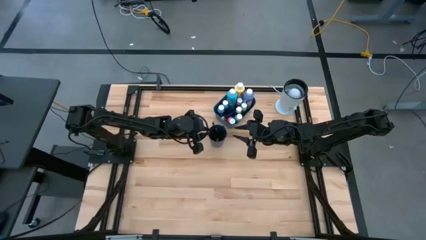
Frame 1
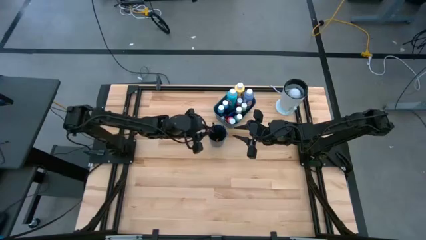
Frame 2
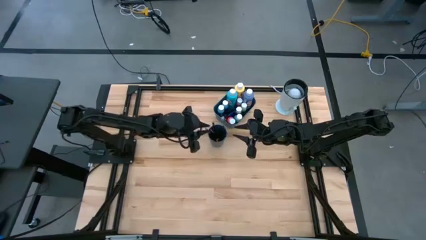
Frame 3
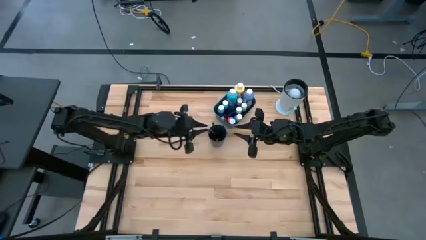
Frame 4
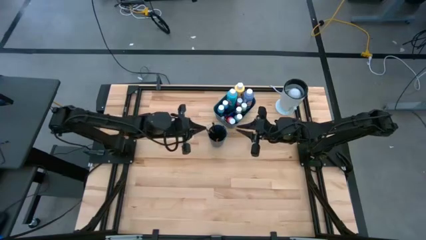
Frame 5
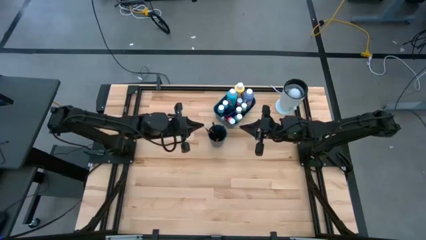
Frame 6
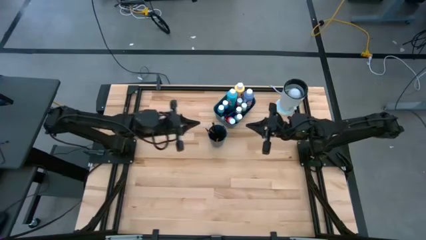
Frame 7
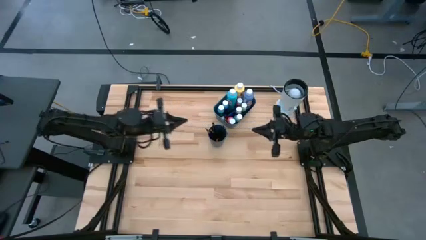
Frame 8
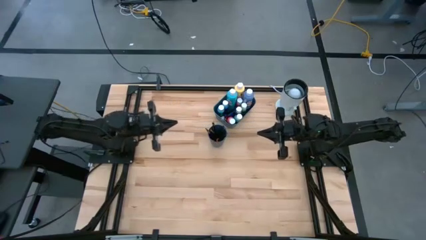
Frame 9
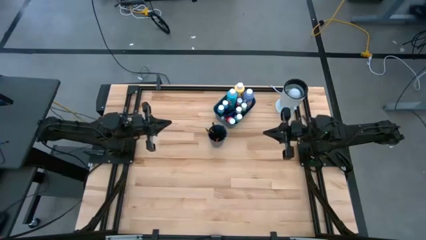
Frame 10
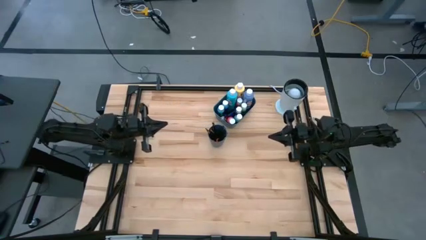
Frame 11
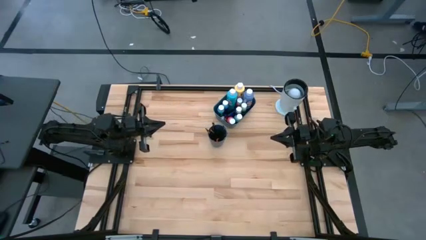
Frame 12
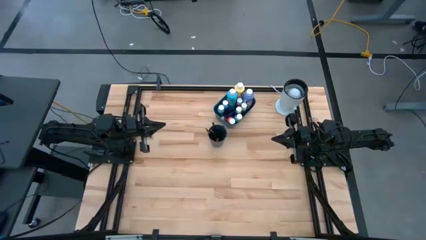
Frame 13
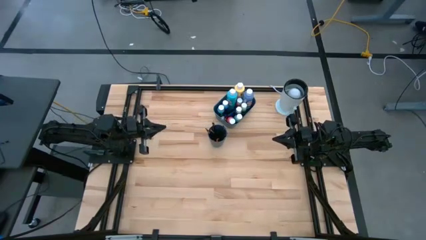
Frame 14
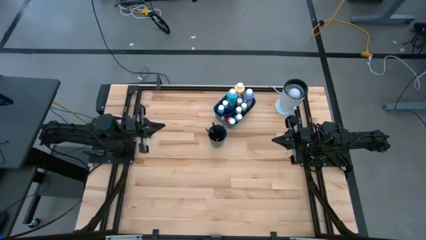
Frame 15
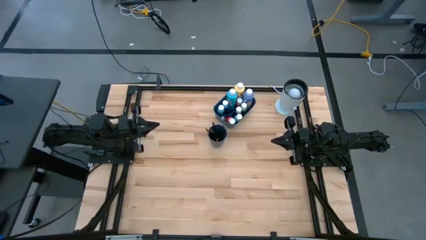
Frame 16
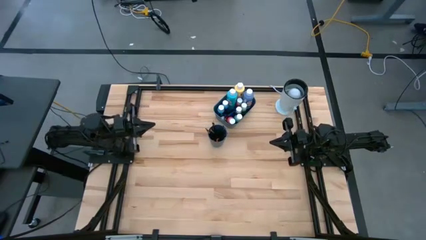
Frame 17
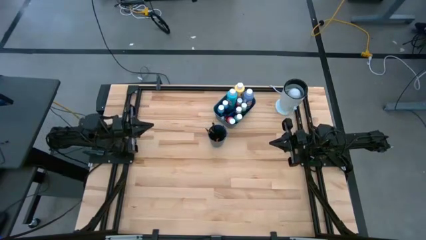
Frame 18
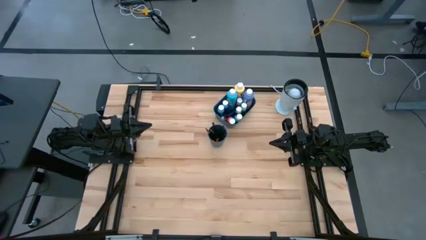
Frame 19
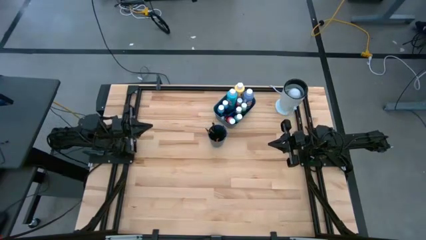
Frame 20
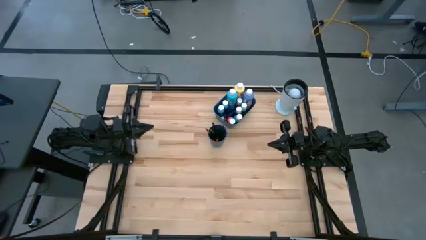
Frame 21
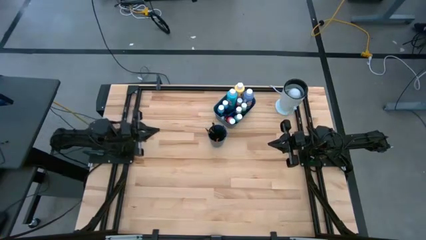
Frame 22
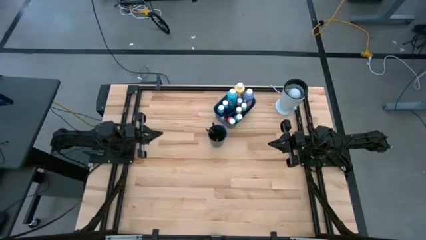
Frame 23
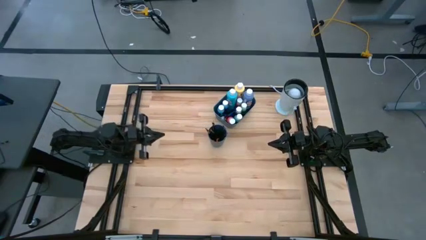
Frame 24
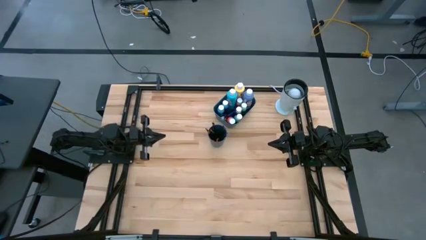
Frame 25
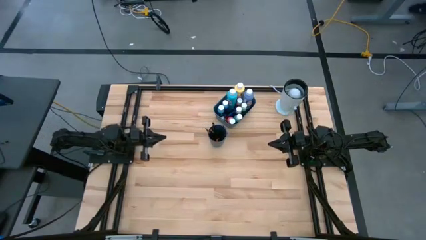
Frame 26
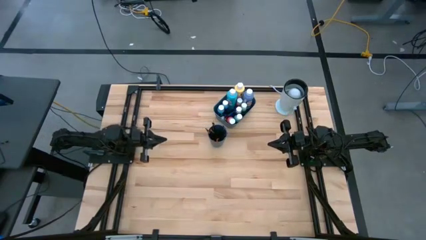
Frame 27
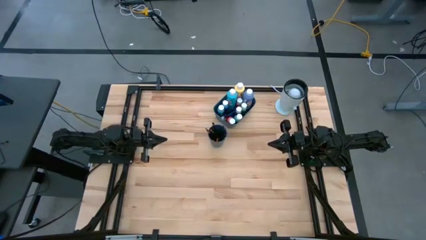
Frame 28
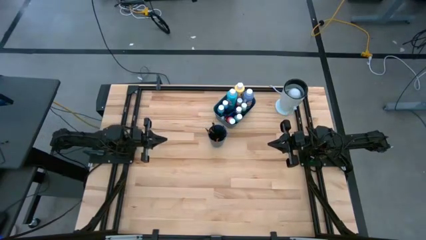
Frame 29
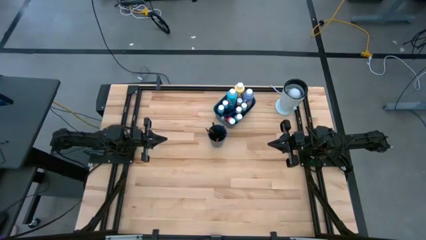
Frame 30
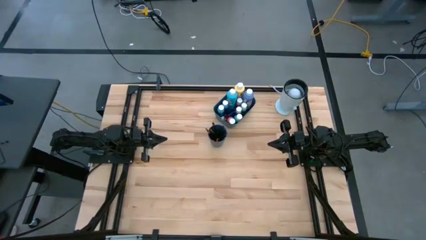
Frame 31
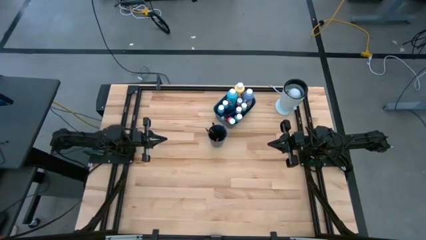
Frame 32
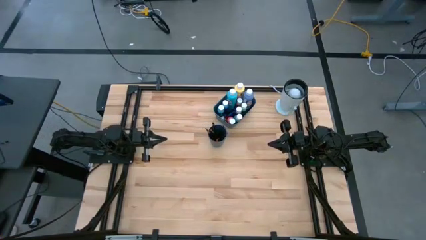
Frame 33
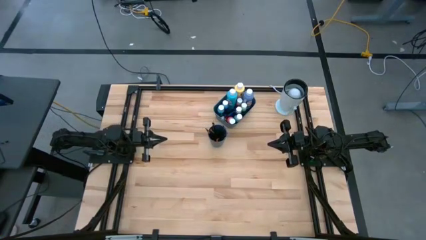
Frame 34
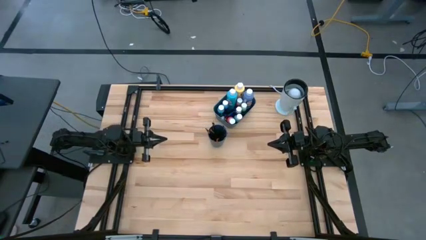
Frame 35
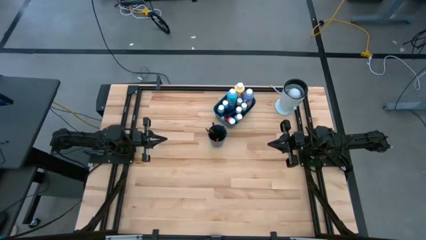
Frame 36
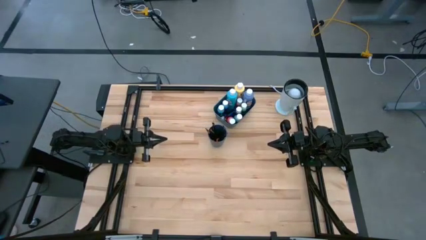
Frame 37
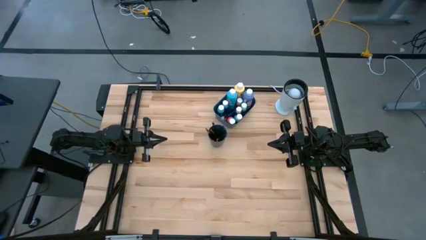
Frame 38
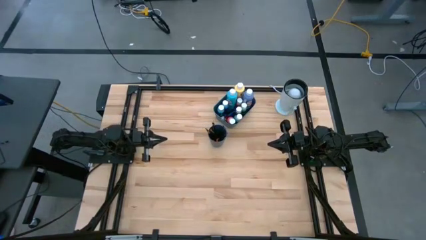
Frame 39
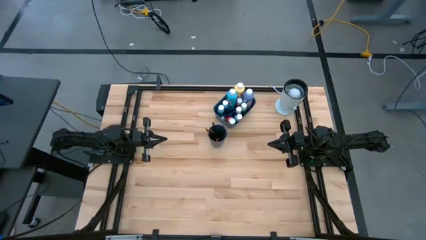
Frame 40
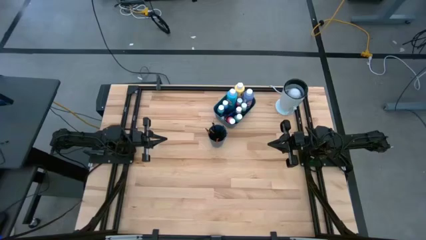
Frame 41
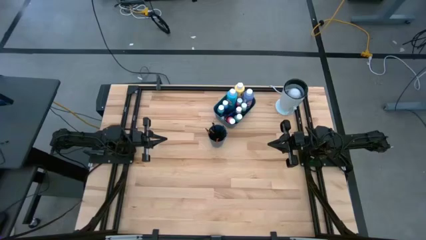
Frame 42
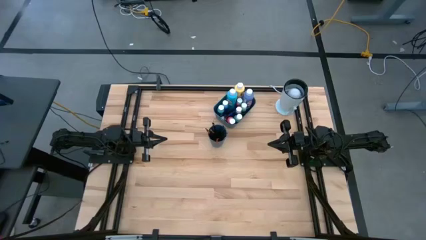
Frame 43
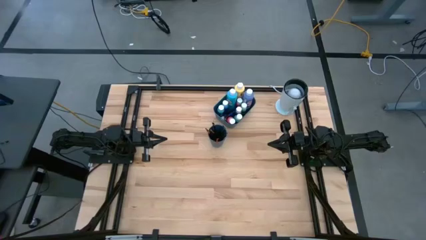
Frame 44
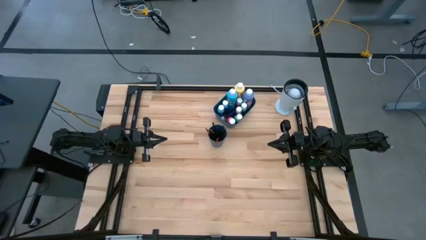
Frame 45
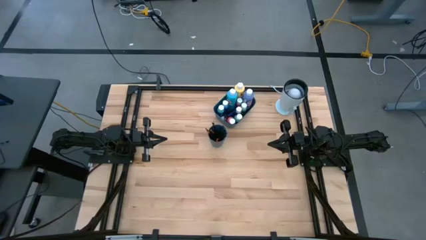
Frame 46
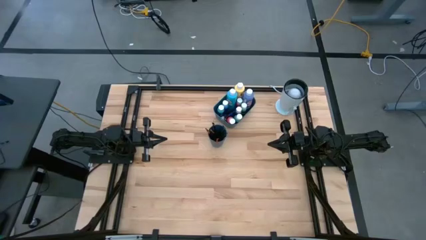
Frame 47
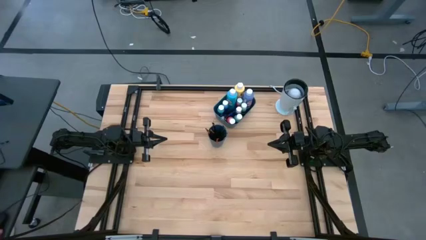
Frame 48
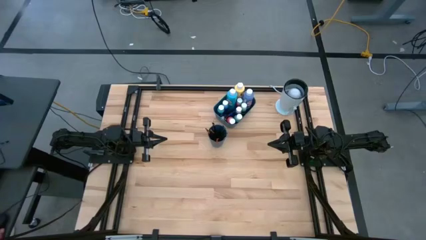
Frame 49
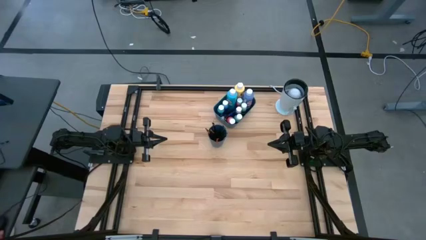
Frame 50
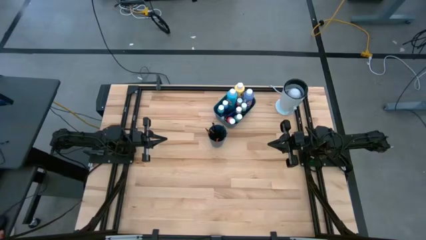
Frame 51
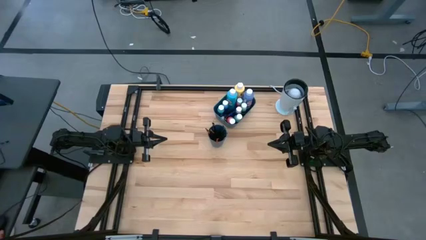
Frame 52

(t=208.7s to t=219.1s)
Task: Pick & Place Paint Supplies
Return to Home Position

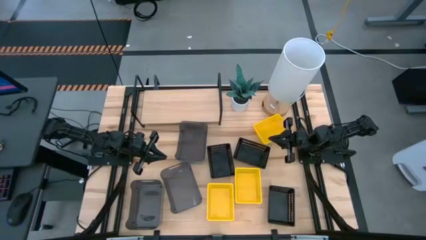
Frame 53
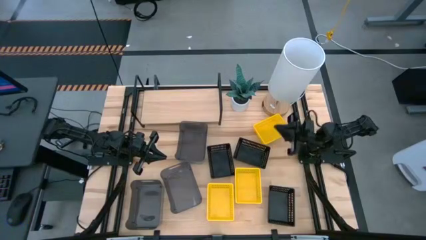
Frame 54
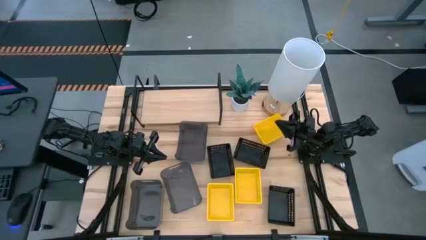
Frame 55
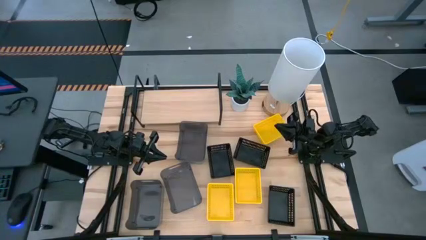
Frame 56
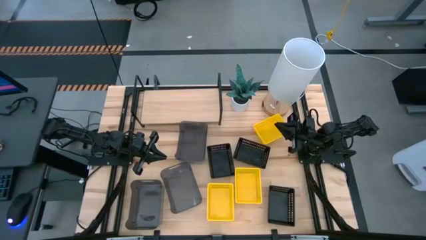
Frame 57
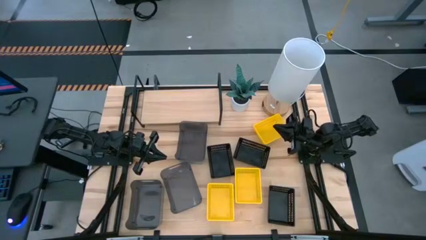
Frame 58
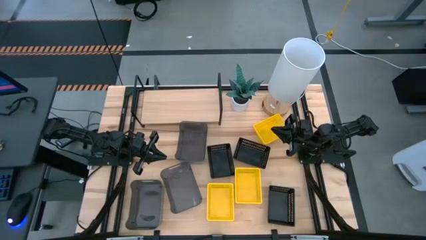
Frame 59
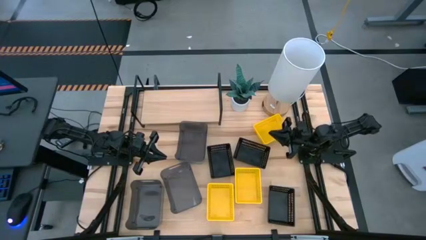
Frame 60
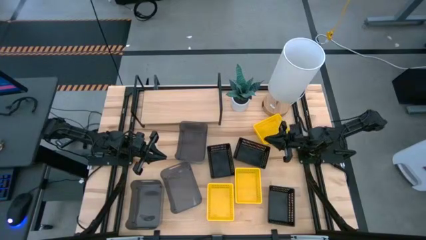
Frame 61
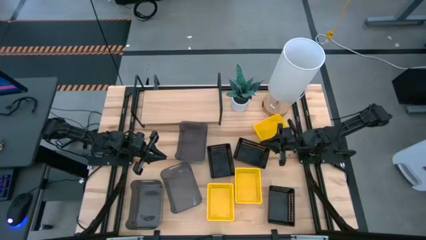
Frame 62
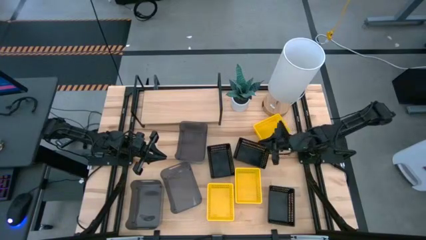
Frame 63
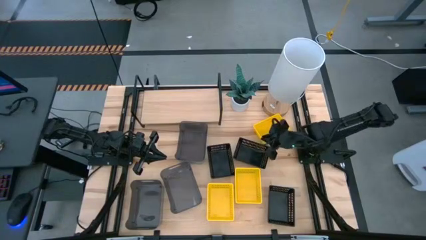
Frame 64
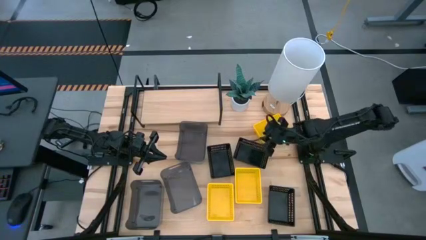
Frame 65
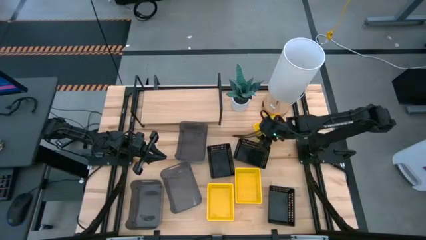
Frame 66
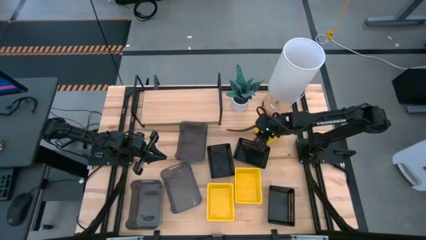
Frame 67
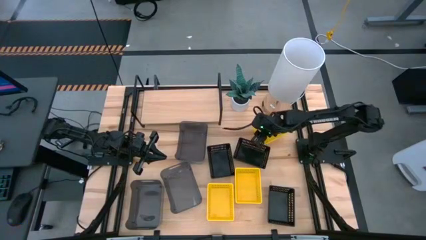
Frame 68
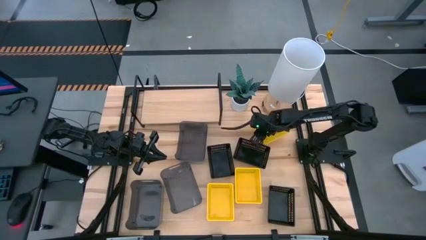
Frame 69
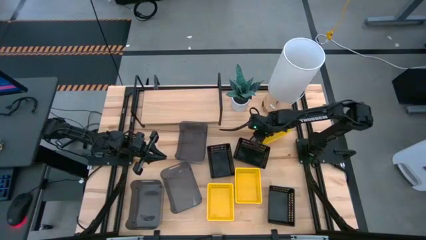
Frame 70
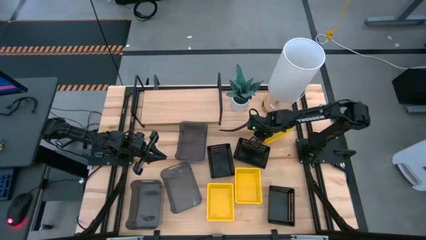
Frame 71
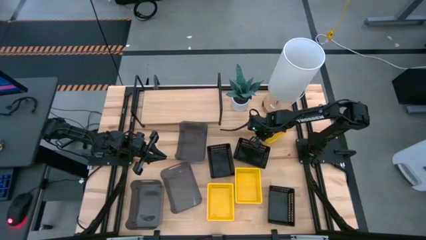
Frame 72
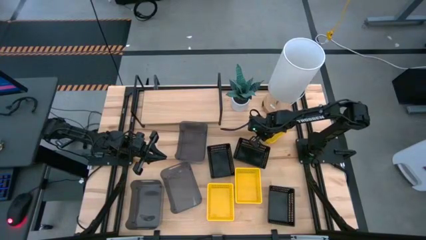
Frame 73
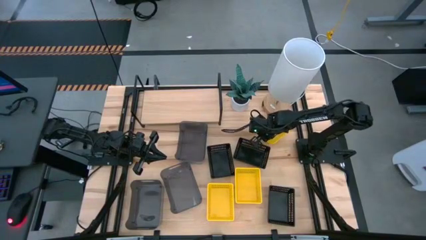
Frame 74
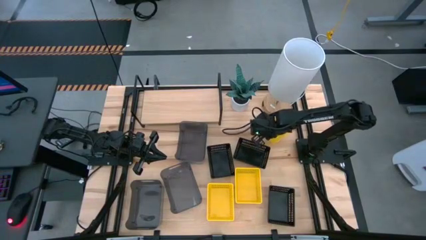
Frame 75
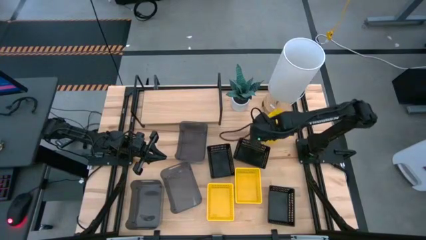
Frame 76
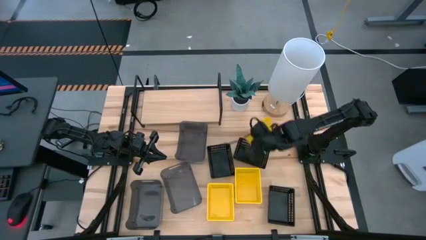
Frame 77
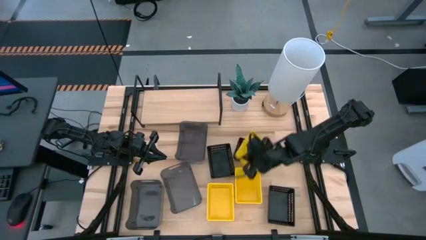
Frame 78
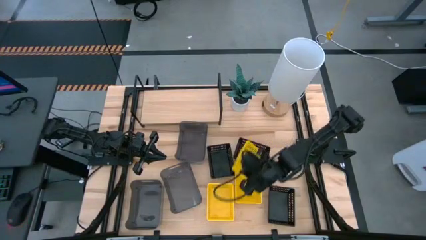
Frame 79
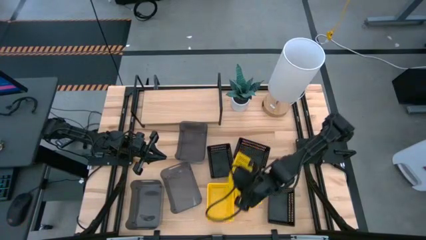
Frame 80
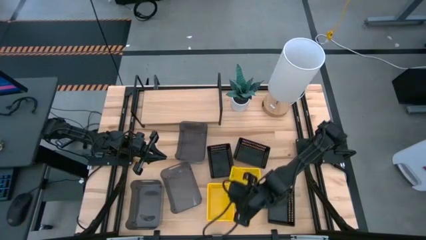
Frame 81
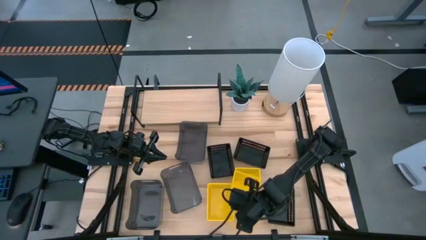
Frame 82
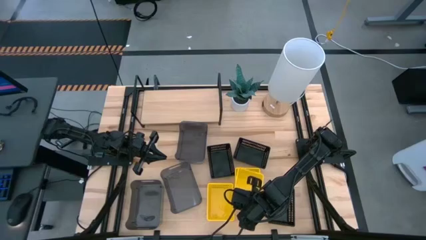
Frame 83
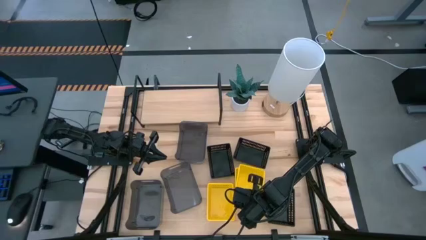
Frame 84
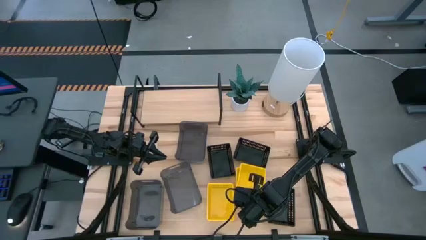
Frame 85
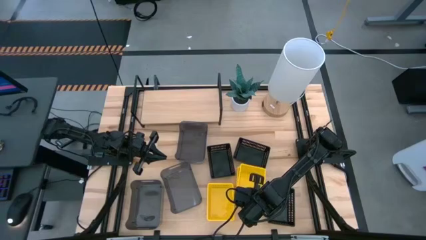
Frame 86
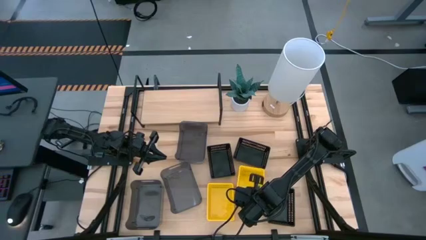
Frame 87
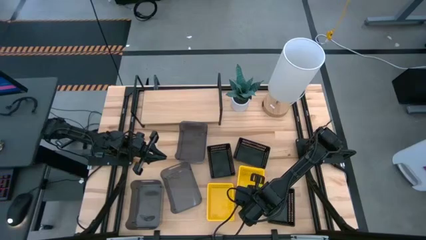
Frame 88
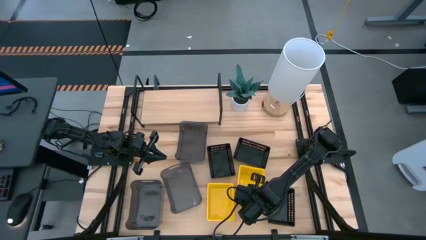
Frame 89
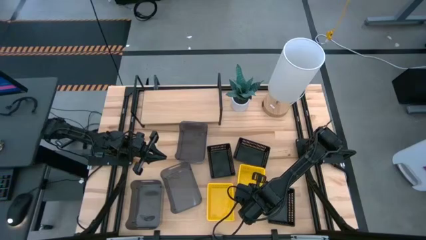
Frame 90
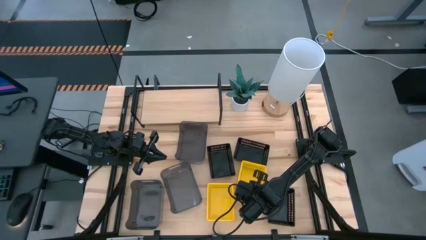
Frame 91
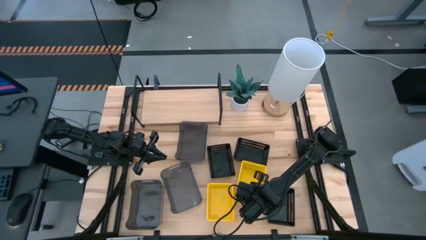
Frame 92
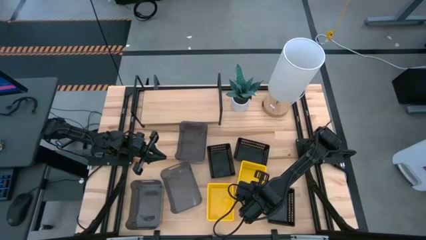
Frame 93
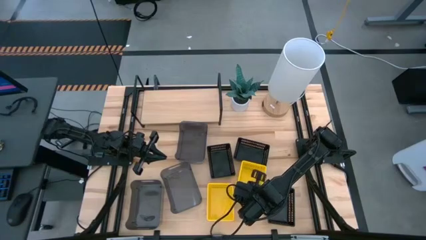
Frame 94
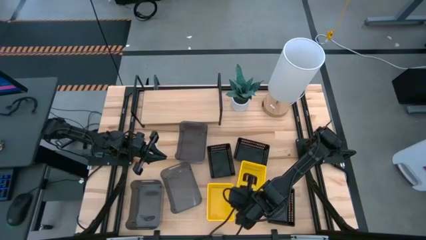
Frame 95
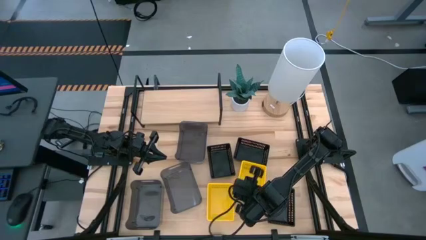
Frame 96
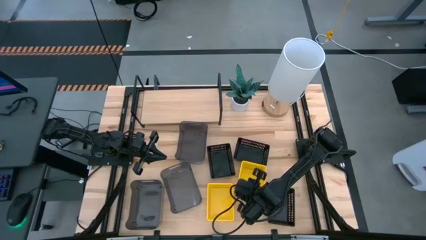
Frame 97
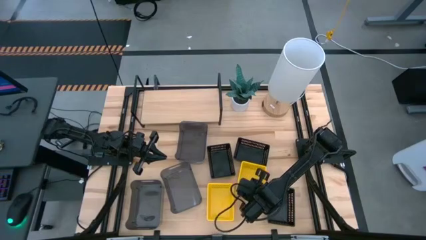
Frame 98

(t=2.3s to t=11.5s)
Task: Stack baskets on shelf by color
Stack the top yellow bin on top of the bottom right yellow bin
